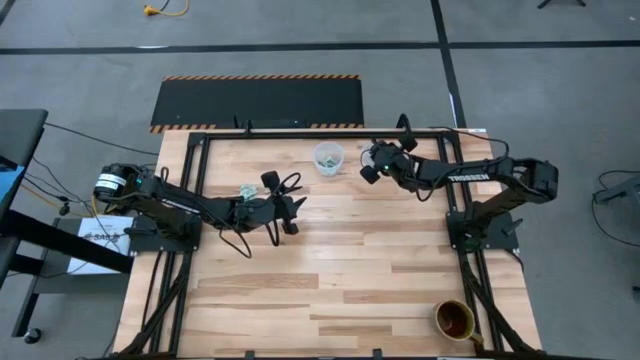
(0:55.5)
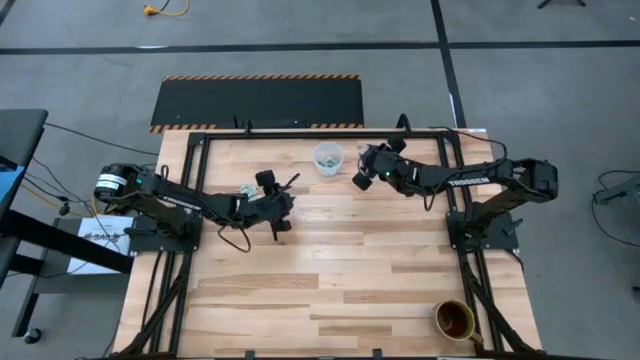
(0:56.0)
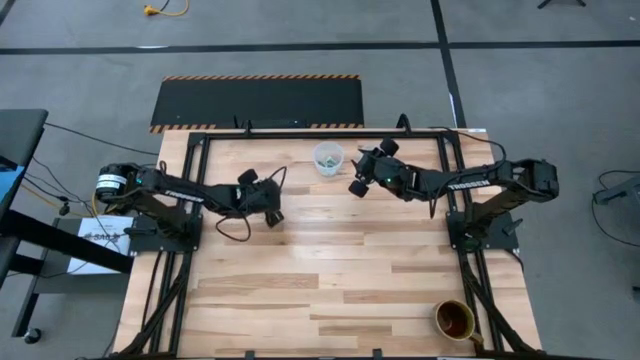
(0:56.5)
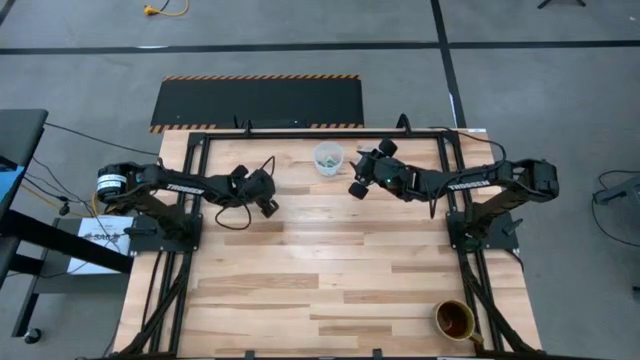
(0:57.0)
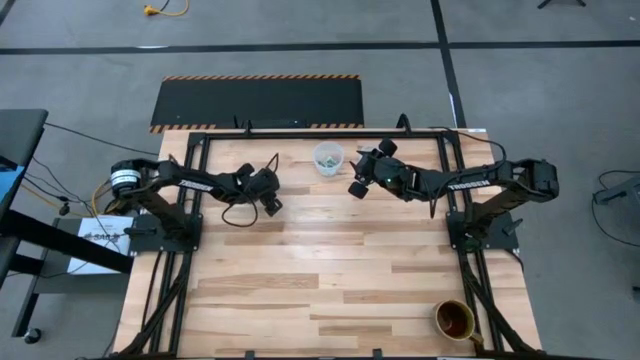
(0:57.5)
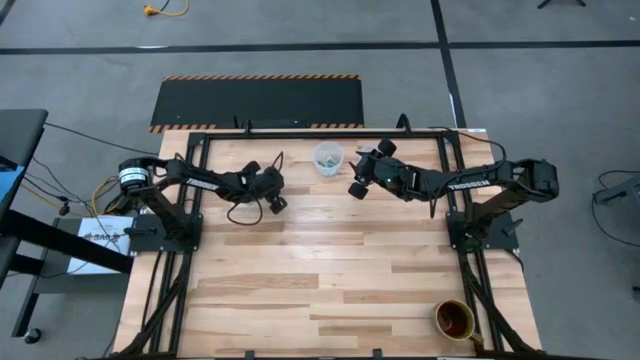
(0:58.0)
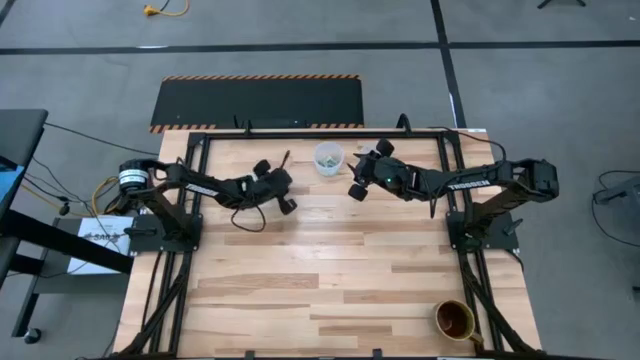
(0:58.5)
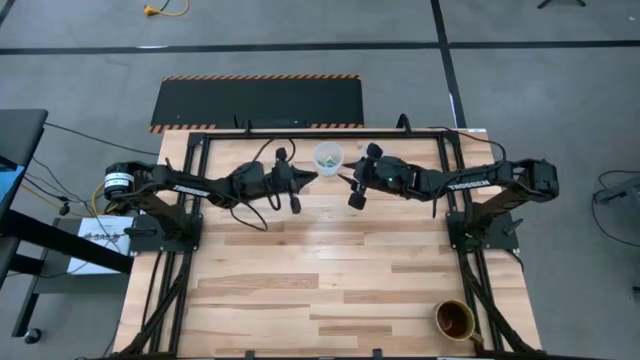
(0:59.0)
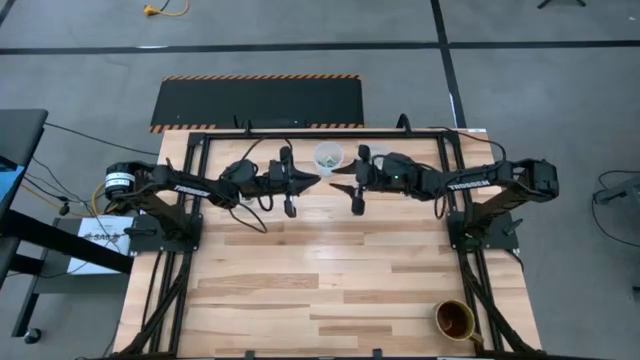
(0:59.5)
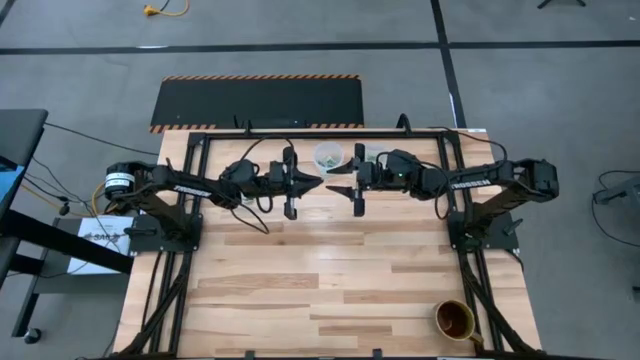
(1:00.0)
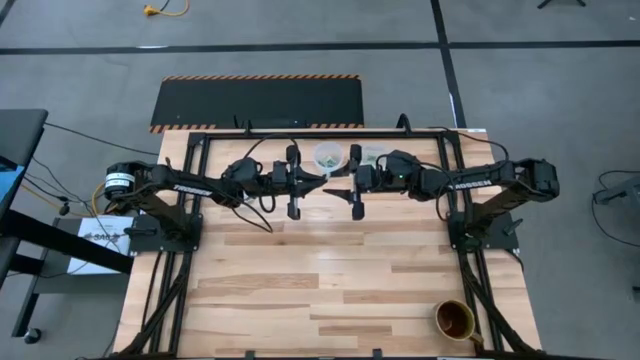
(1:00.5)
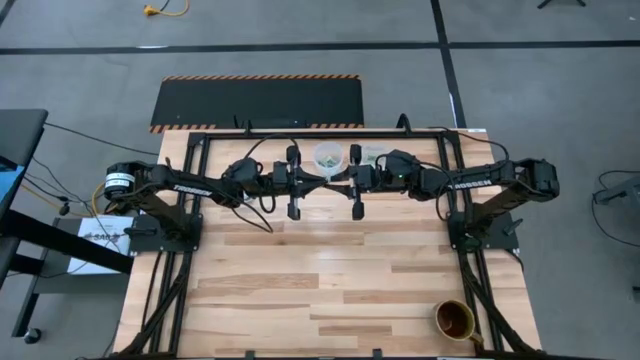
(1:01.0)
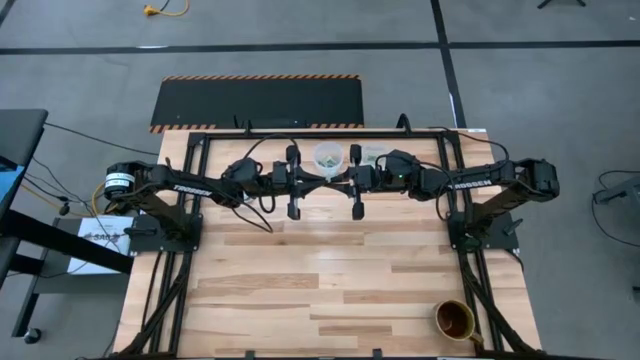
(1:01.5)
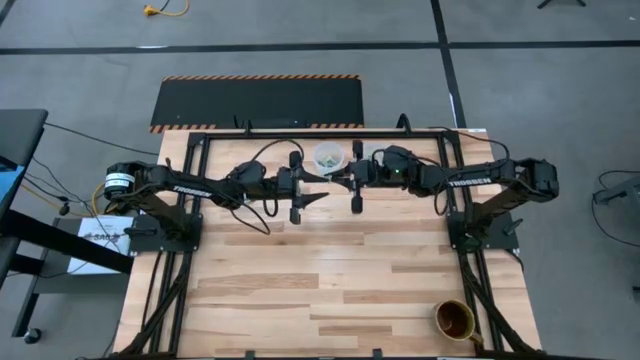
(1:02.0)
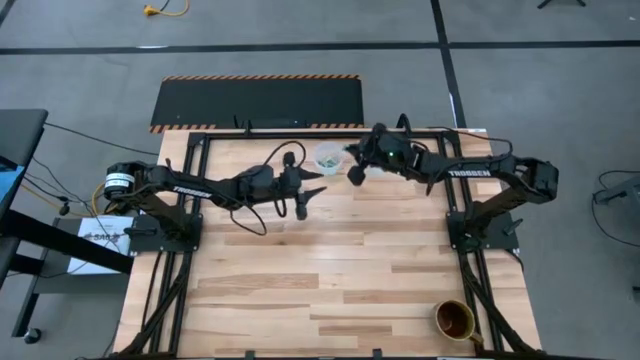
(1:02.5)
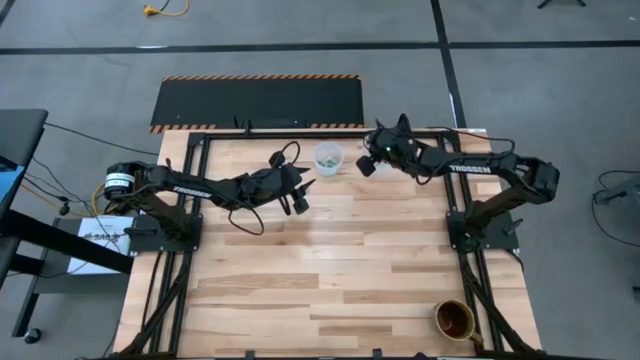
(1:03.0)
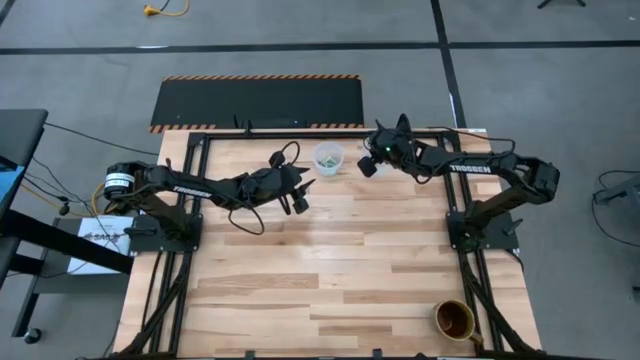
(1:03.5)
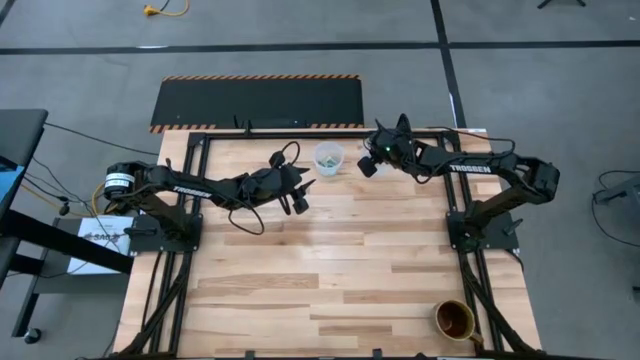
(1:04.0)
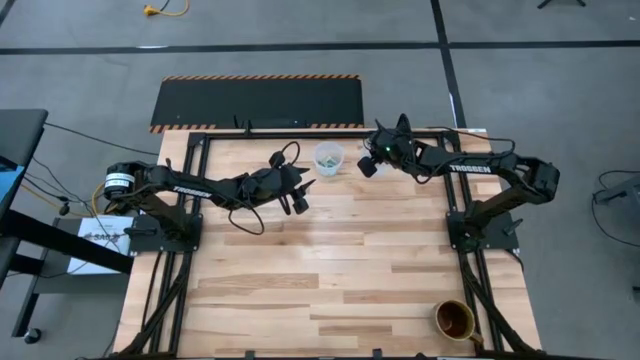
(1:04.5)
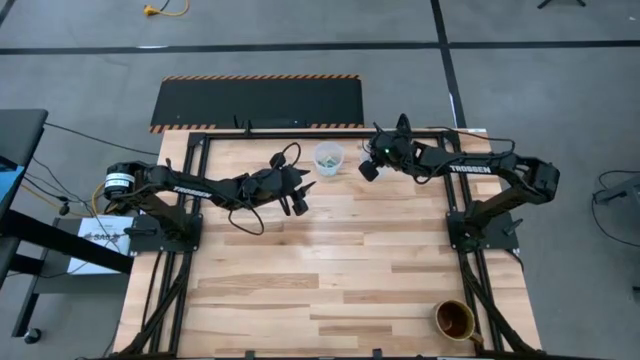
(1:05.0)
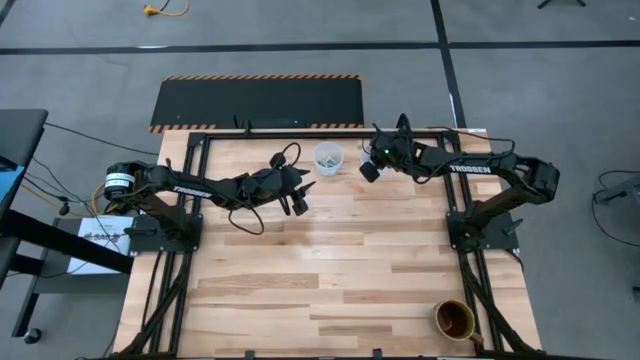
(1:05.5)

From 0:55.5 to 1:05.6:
Task: Pick and place Stevia / Truvia into bins
Put the stevia packet into the right transparent container

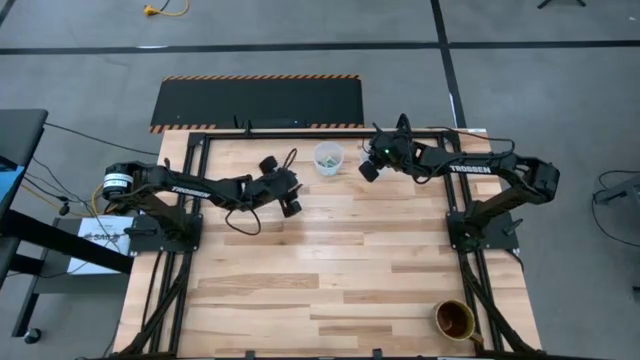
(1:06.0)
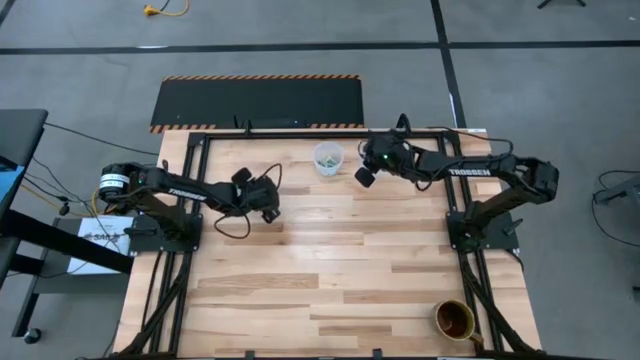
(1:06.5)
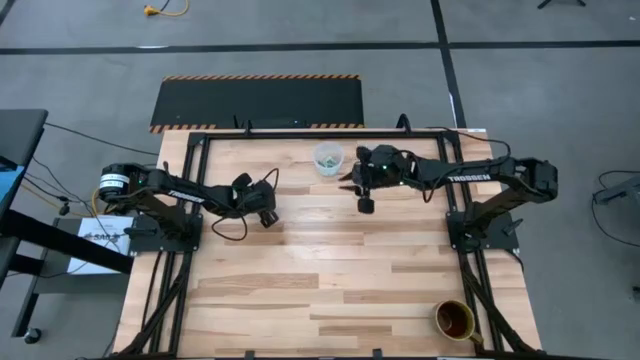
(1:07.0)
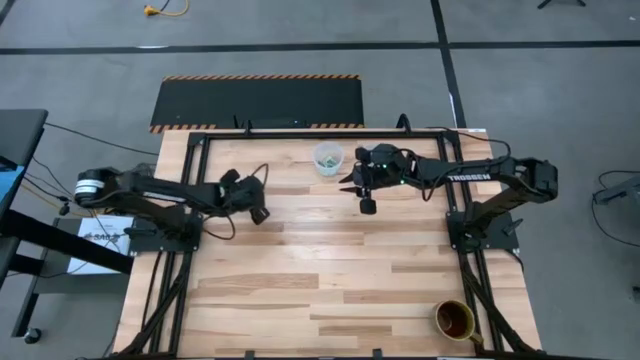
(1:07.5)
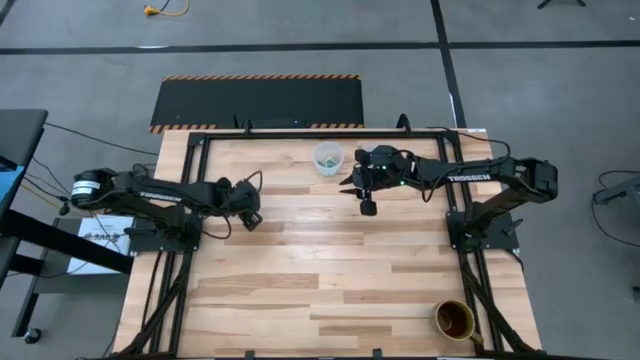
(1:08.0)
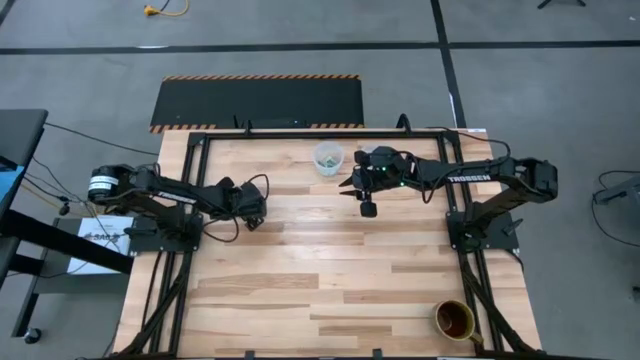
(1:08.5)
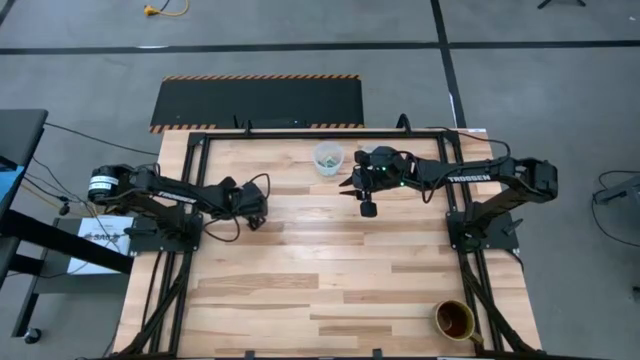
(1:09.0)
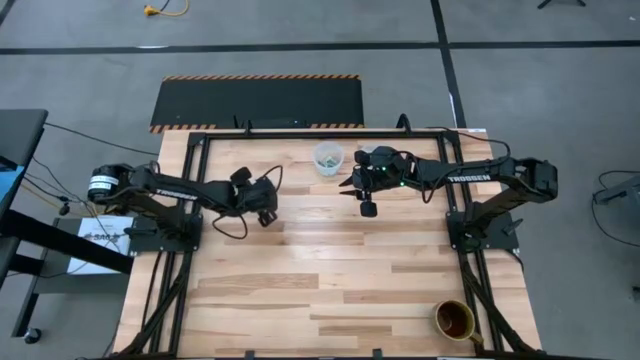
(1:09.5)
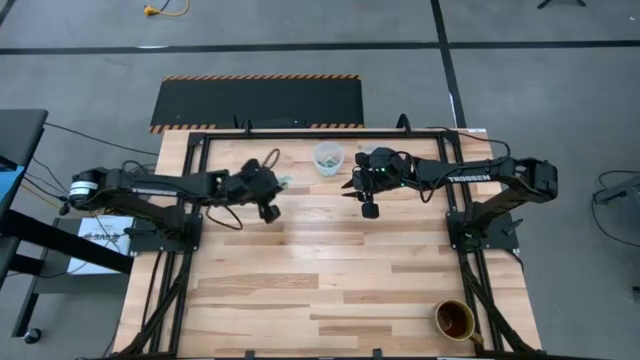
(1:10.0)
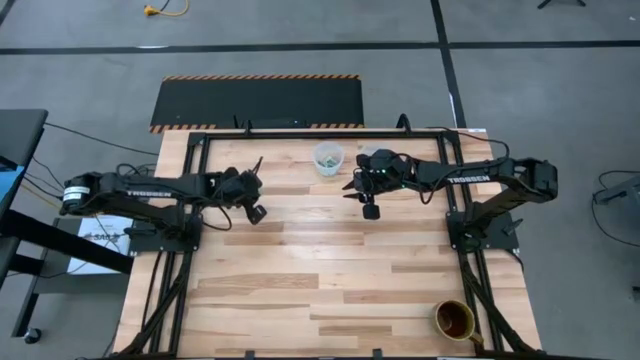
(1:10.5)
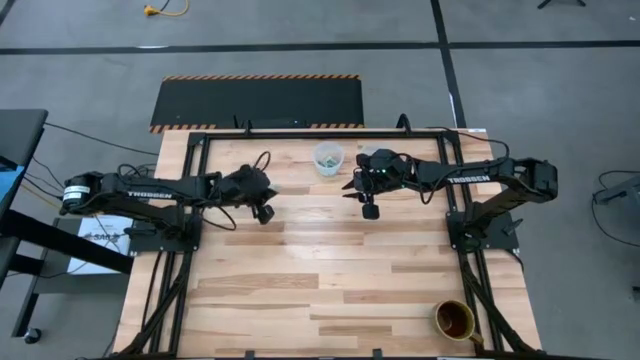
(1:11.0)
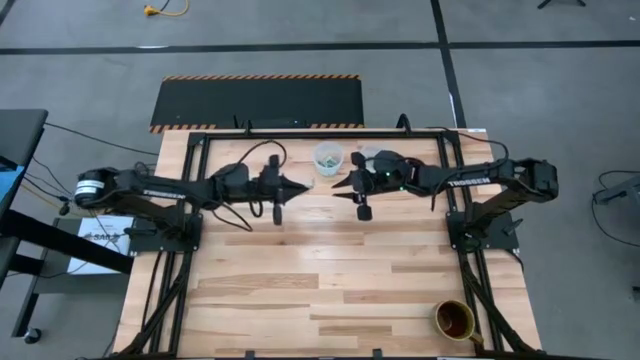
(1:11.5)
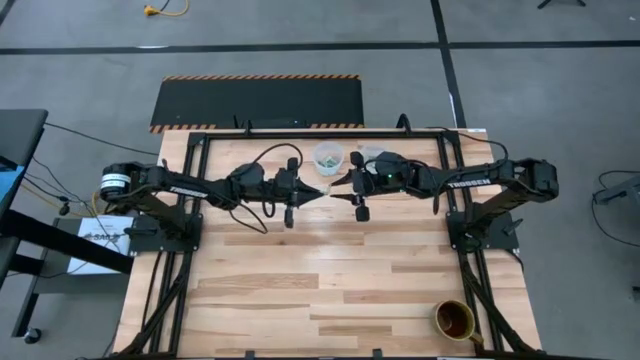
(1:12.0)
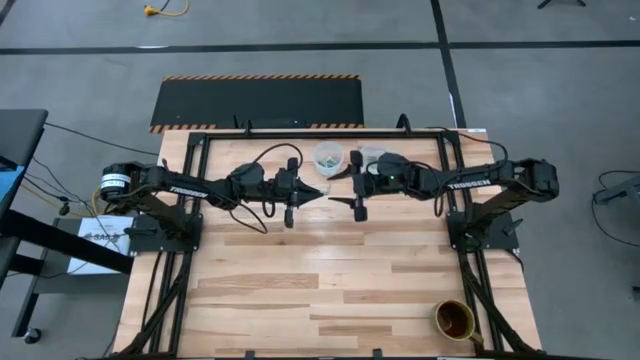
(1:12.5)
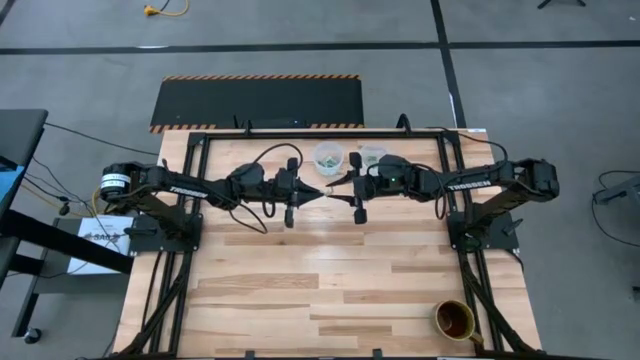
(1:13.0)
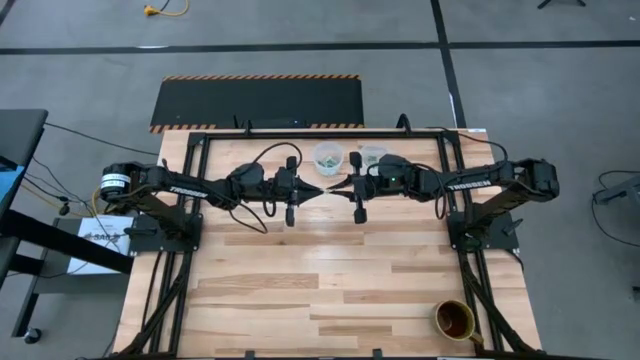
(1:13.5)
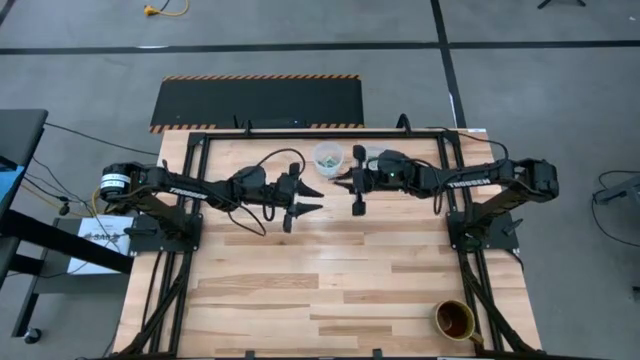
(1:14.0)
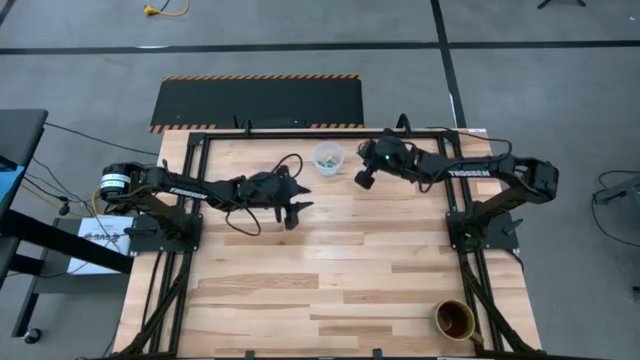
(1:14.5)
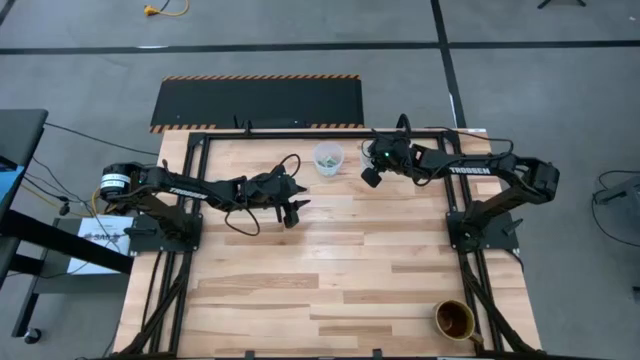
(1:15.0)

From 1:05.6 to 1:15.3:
Put the stevia packet into the right transparent container

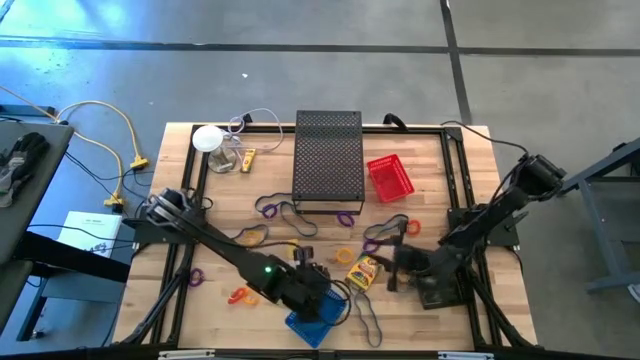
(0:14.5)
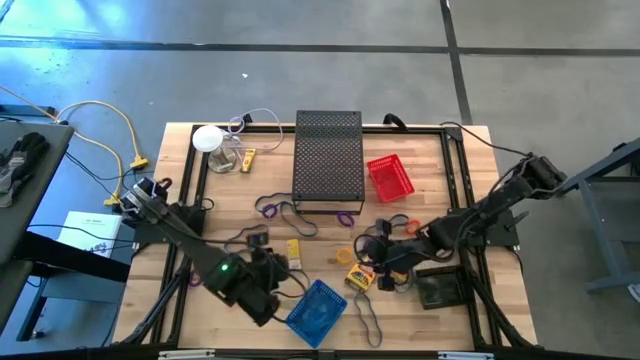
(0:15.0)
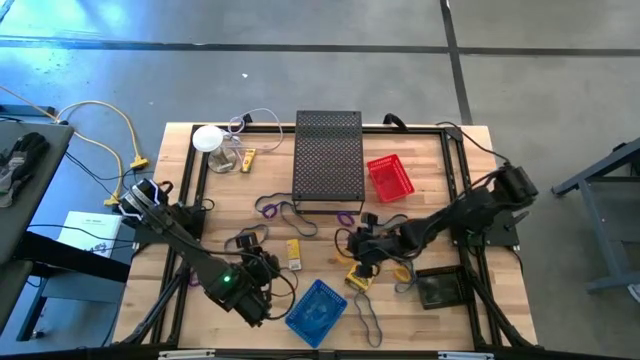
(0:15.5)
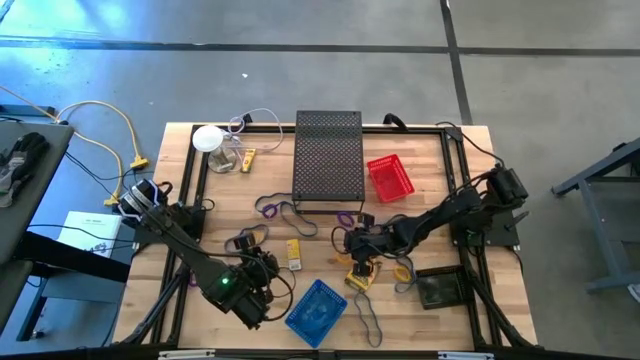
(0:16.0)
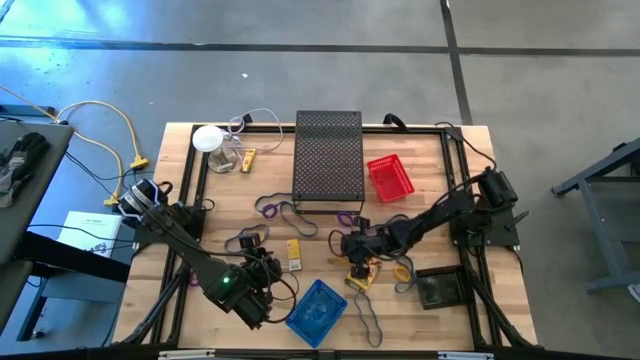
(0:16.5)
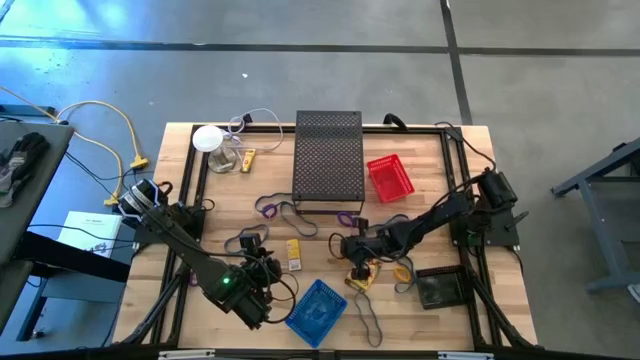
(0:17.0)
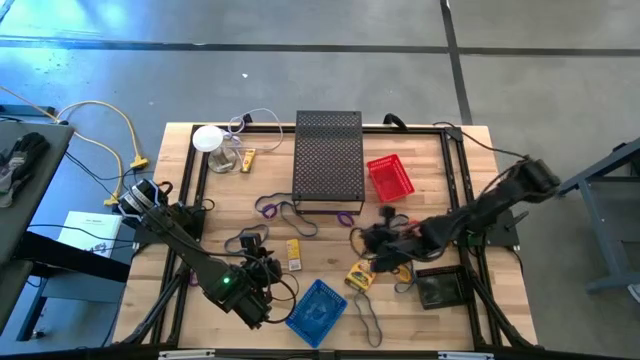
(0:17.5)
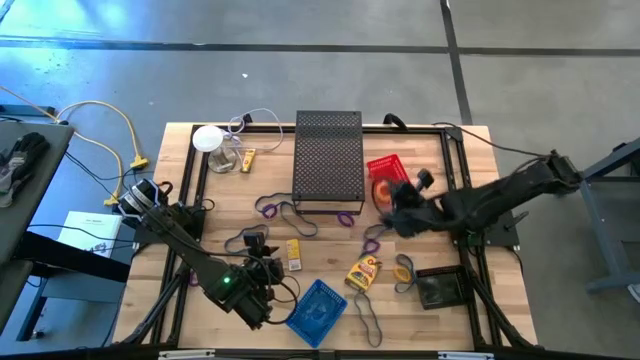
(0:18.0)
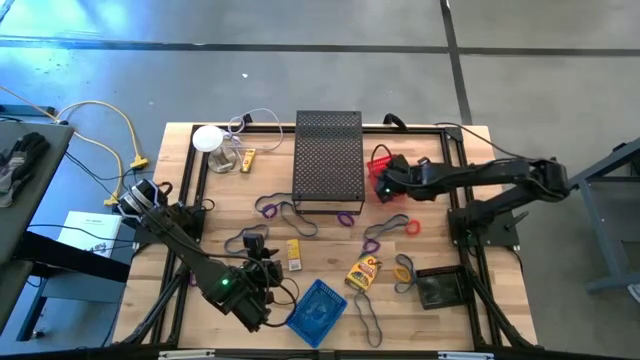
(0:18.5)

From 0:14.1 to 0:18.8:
Task: Pick & Place Office Desk Supplies
Put the yellow spring keychain into the red bin
